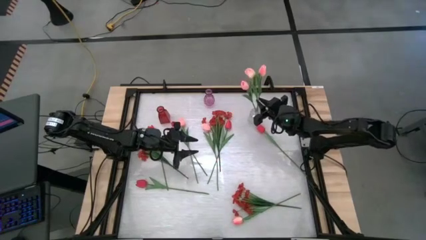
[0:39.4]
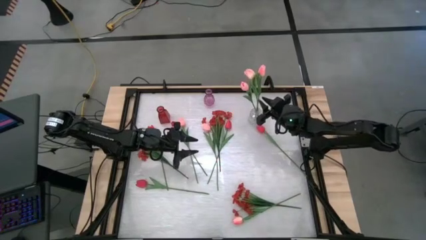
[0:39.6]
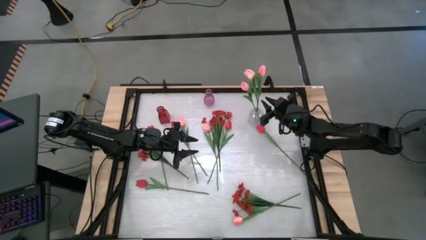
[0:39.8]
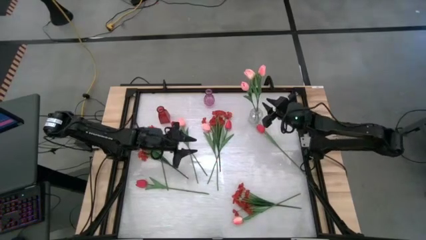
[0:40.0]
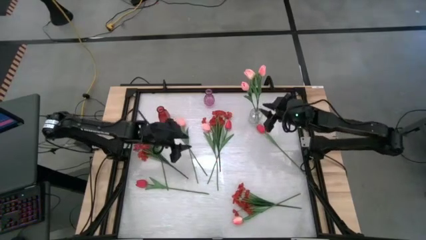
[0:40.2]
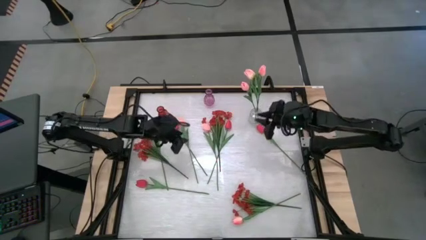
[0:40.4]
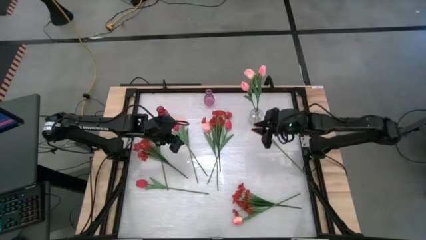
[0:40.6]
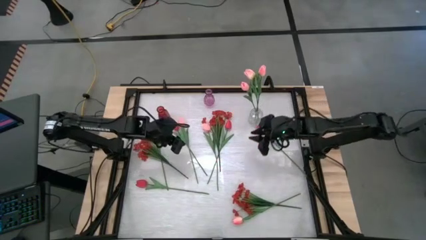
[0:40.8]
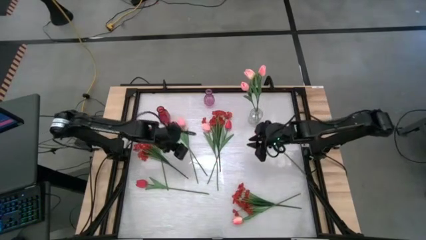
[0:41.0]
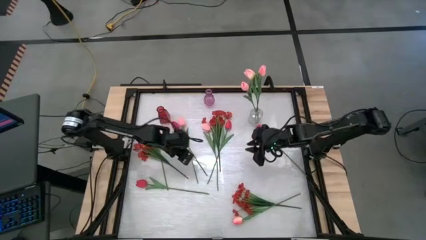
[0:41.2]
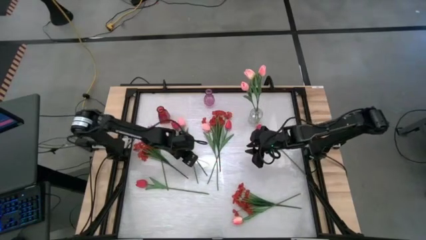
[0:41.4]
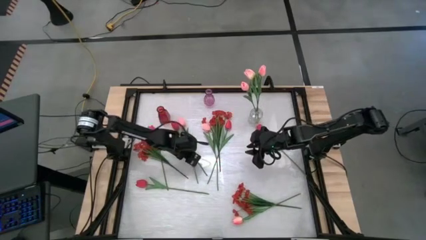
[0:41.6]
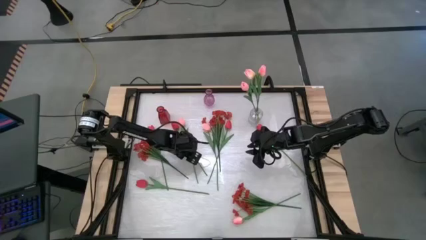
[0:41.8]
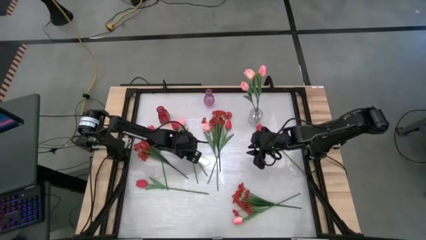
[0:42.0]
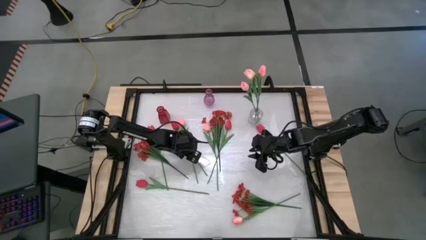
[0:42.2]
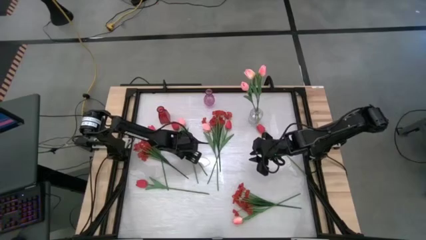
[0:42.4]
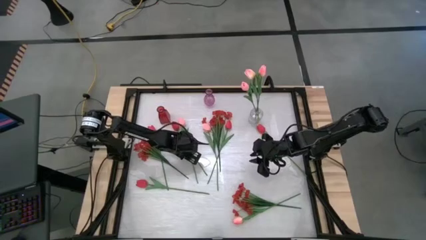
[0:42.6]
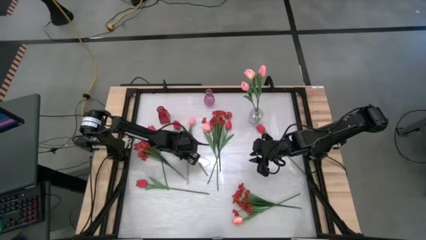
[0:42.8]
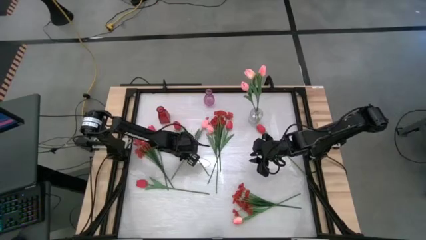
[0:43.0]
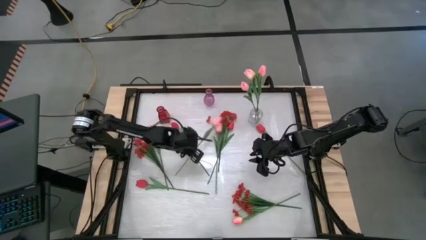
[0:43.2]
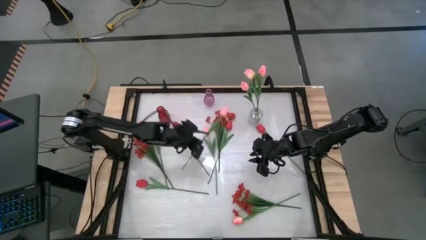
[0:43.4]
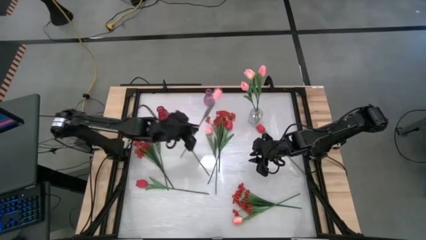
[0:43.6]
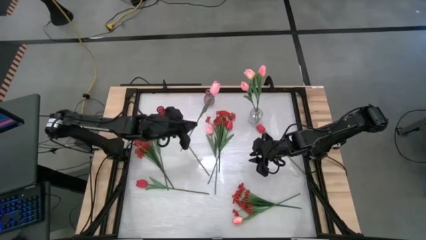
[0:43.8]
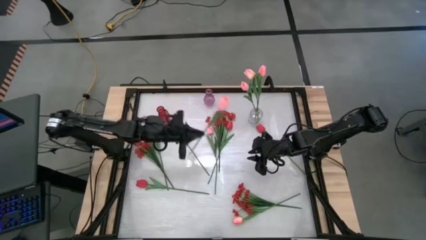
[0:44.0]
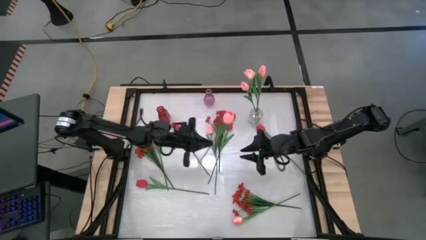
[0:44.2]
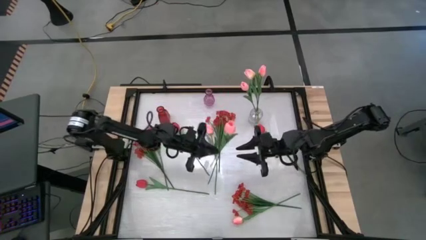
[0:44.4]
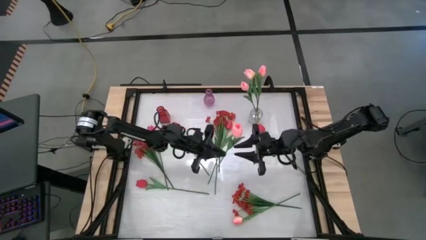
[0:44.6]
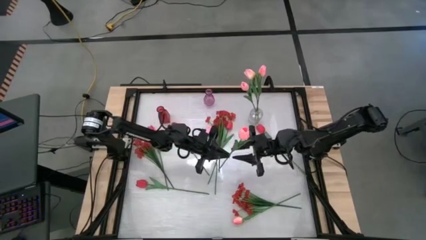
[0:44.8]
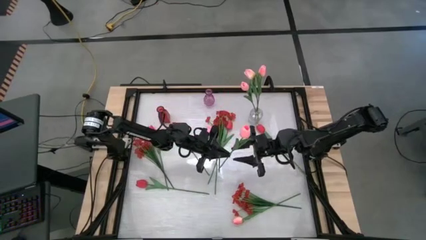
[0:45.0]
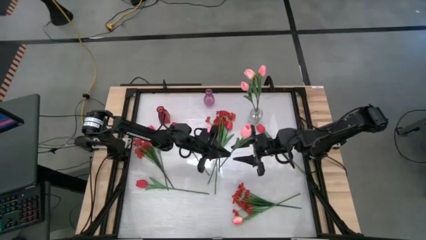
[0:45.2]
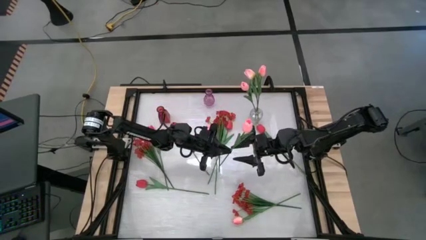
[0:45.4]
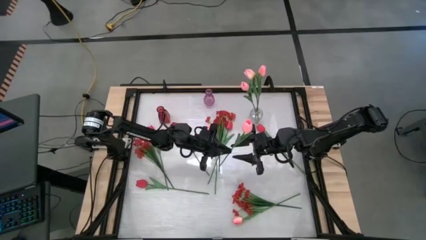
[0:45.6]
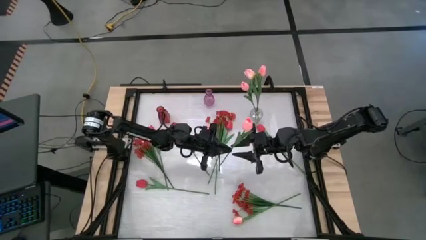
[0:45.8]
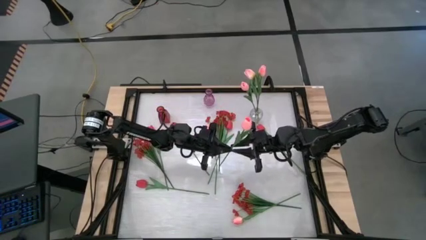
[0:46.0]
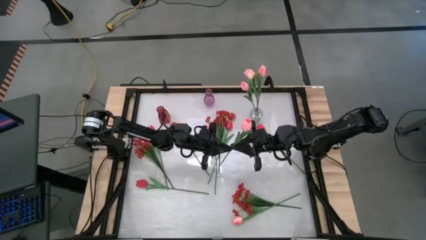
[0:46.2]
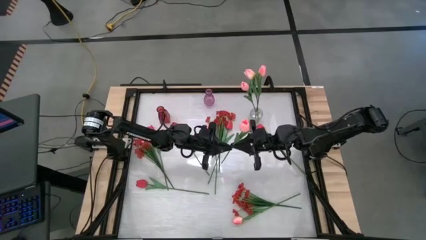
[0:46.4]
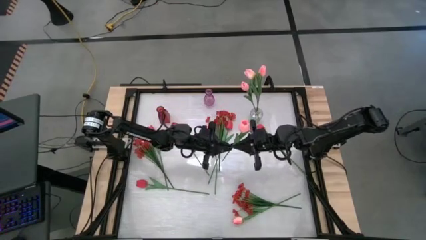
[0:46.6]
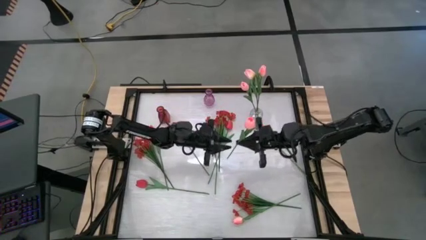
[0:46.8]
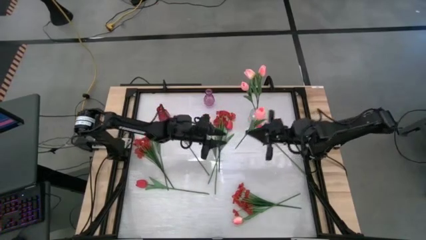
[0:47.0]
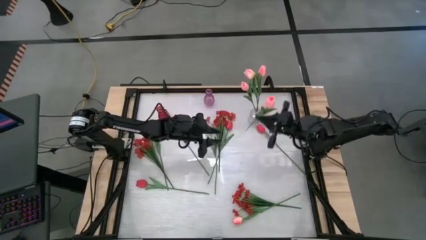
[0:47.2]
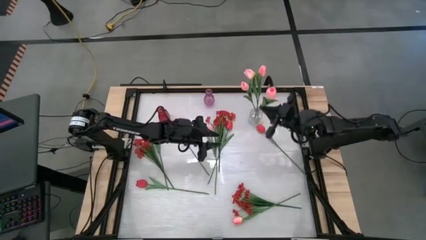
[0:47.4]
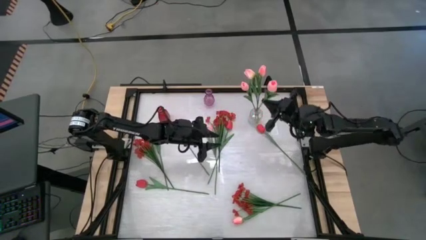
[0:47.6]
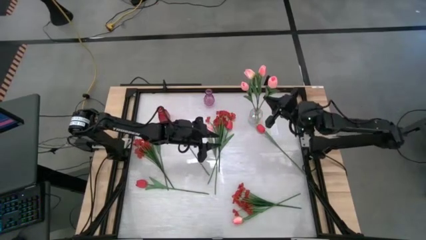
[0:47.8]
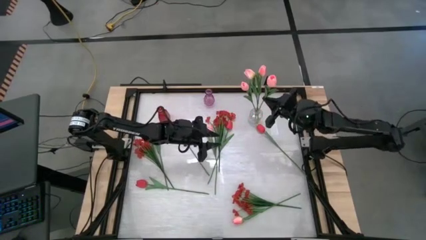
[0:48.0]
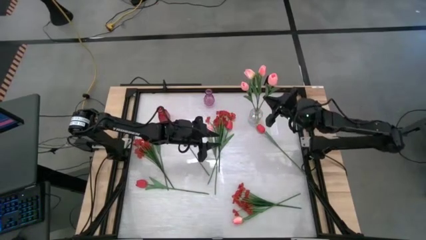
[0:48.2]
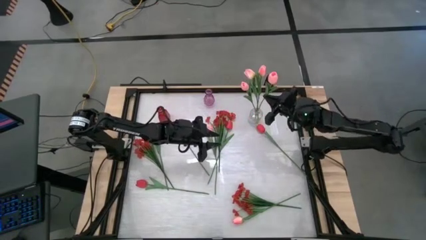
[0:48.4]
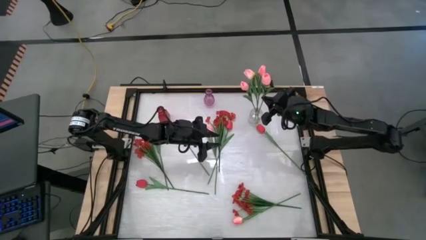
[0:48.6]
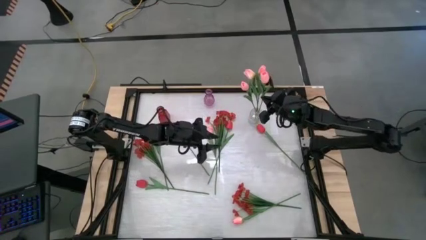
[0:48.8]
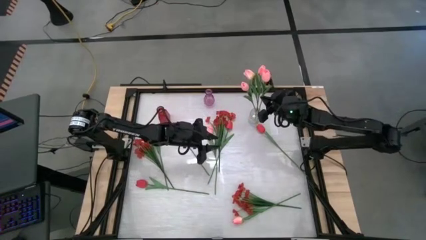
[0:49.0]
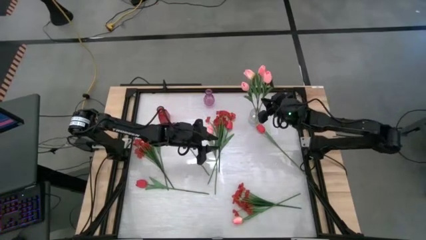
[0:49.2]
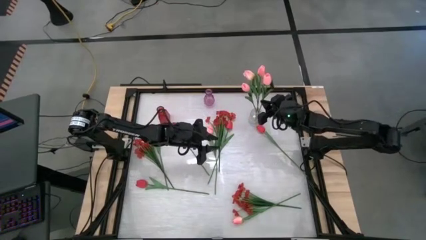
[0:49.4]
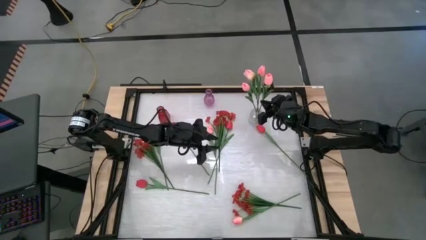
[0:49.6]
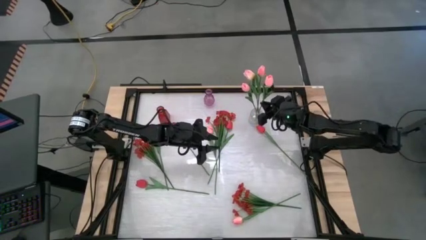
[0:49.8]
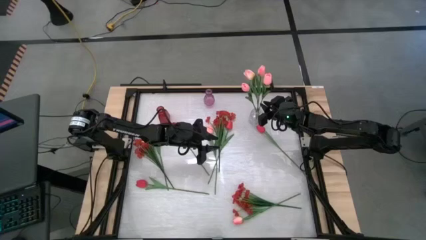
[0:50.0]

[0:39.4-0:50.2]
Task: Sort flowers into vase by color
Put the top left pink tulip into the transparent vase

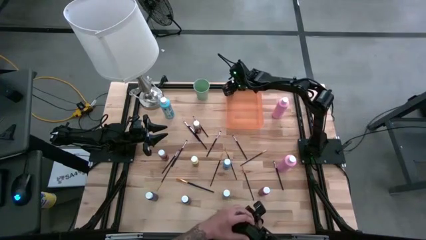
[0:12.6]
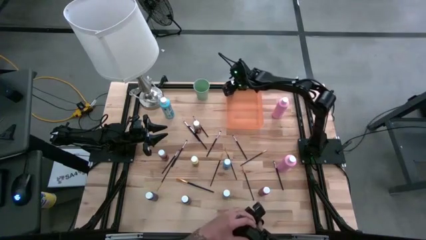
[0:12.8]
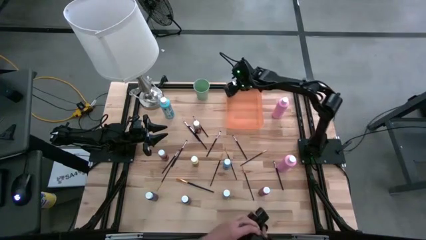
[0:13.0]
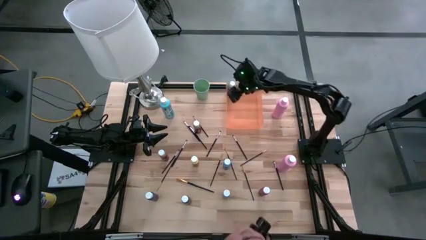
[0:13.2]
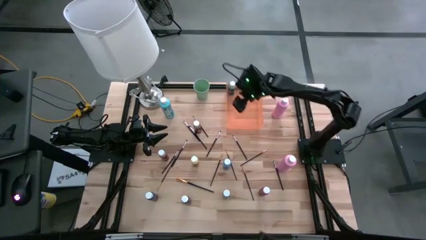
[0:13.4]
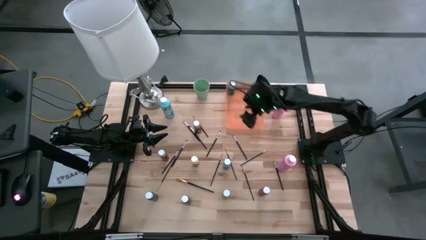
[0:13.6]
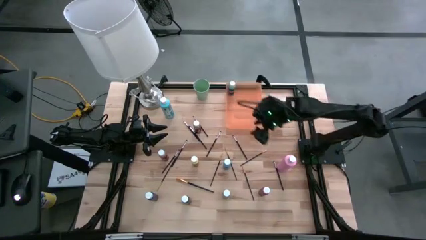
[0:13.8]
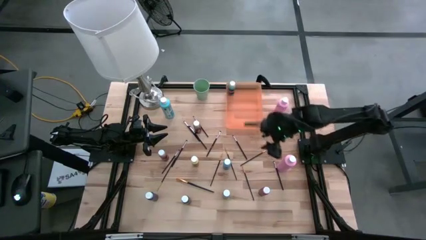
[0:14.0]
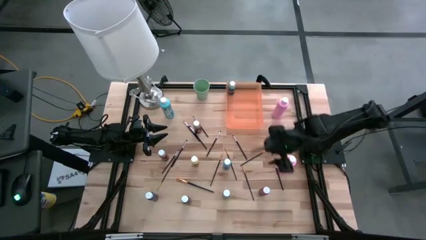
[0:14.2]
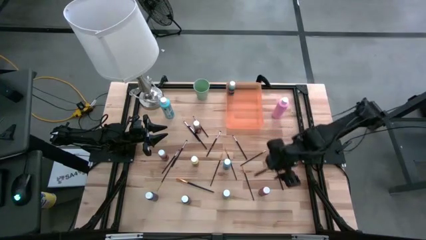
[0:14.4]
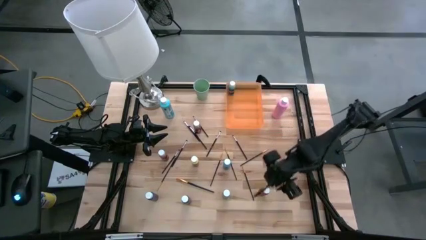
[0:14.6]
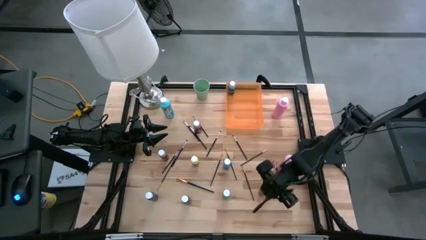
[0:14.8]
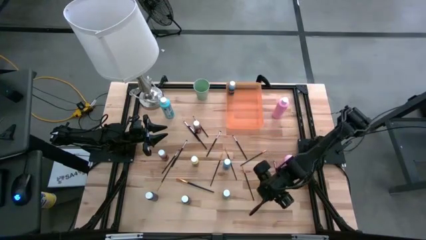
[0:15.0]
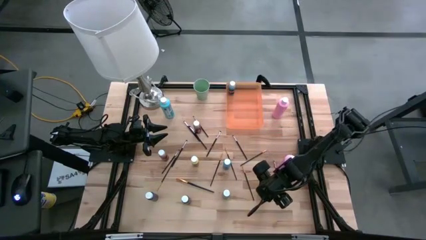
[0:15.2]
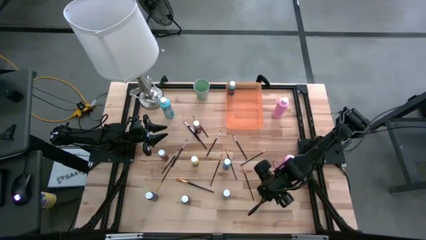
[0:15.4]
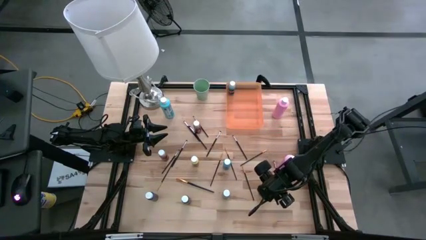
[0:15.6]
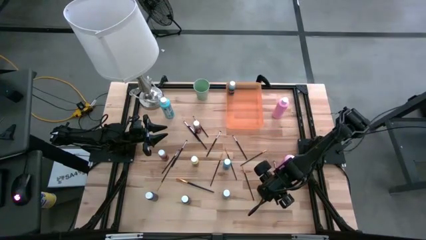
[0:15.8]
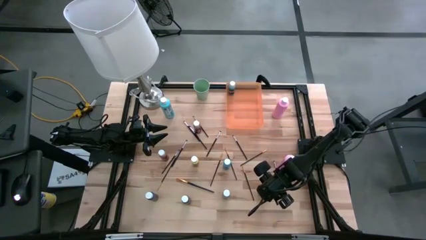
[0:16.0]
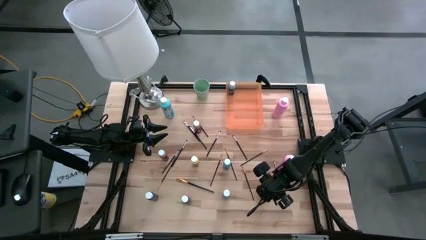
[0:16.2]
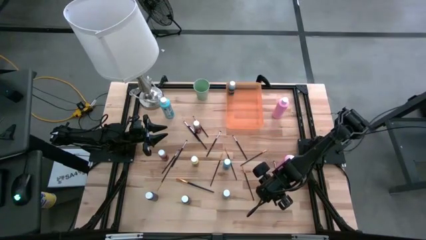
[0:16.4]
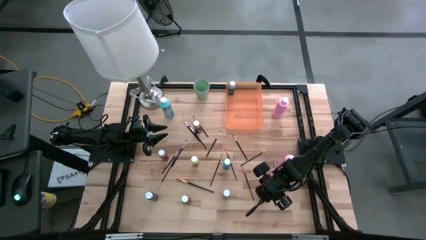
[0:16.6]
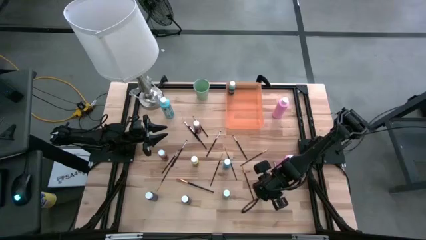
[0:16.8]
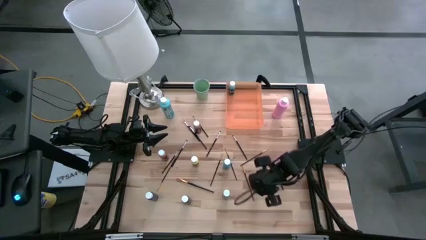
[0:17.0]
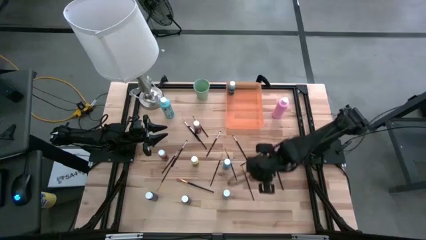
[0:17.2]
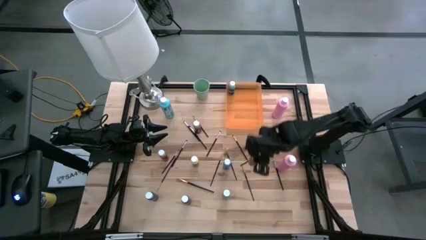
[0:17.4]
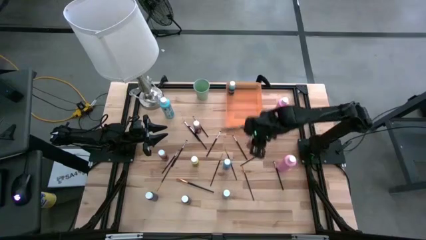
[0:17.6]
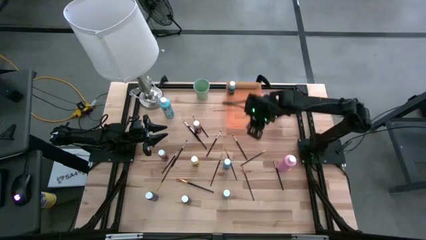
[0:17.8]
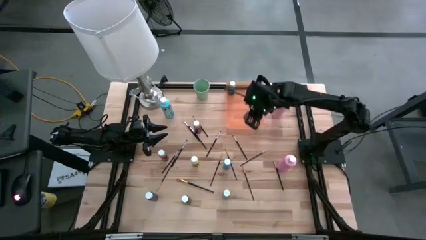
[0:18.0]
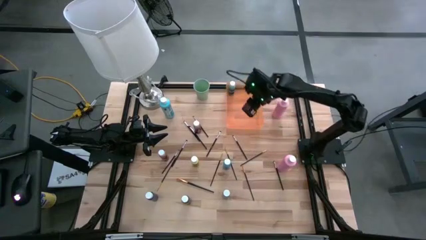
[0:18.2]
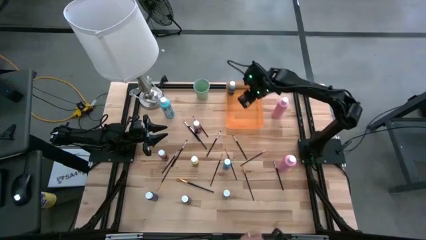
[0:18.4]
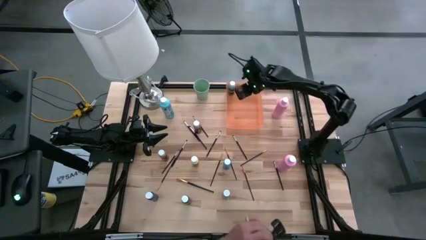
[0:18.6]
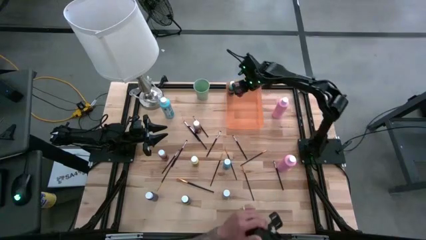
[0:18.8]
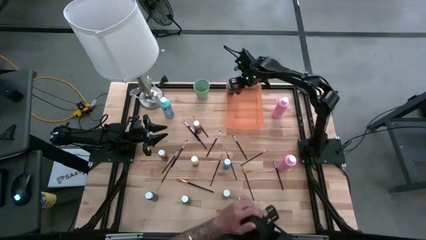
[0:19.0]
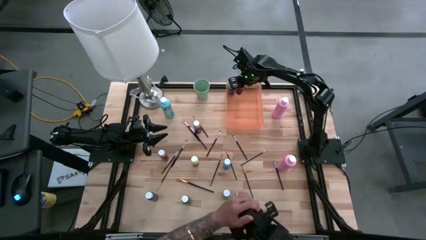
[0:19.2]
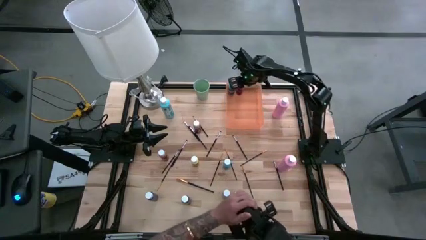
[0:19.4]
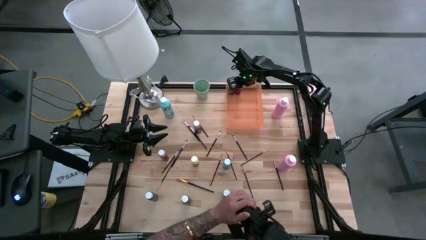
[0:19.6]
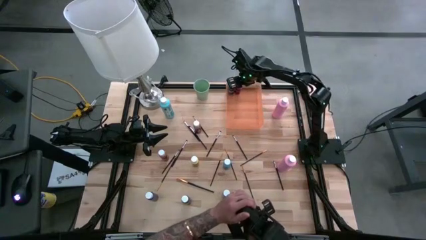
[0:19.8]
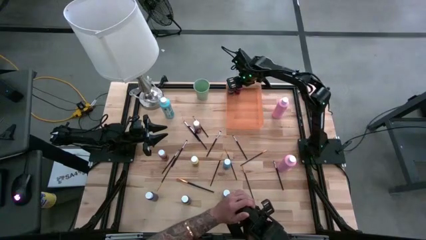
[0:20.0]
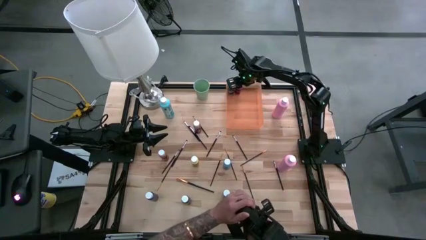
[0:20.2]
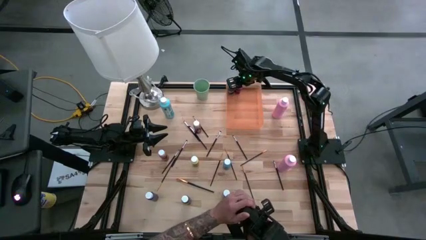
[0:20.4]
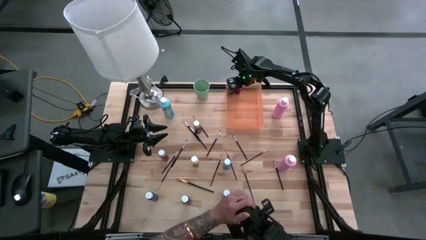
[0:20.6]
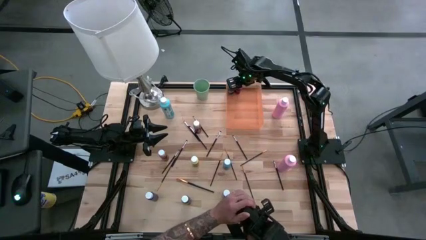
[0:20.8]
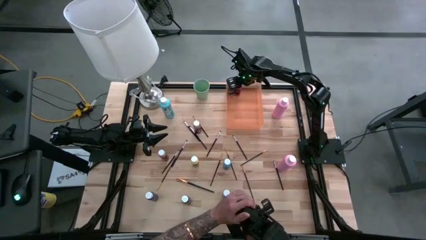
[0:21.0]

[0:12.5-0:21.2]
Task: Pick & Place Paint Supplies
Put the red paint bottle into the orange bin
